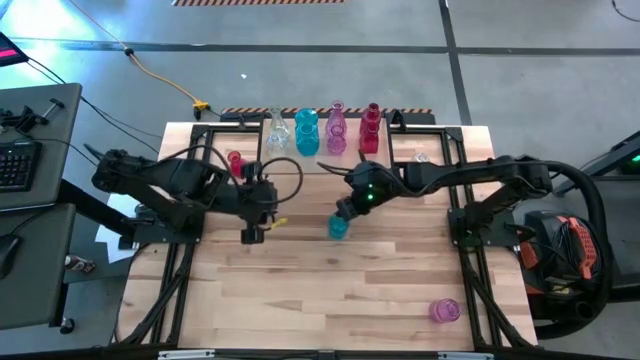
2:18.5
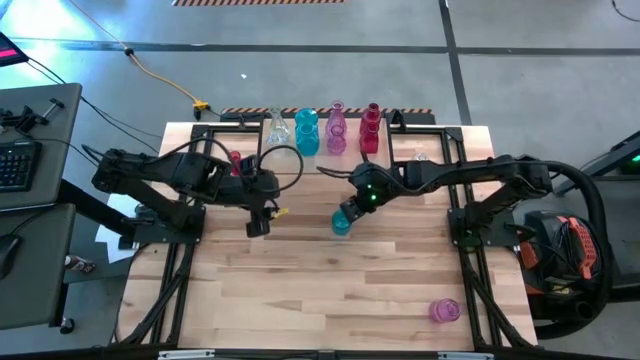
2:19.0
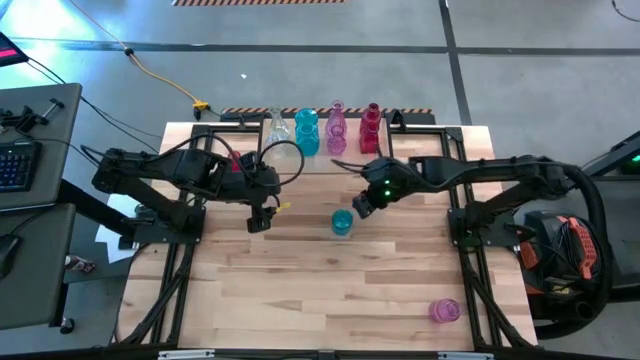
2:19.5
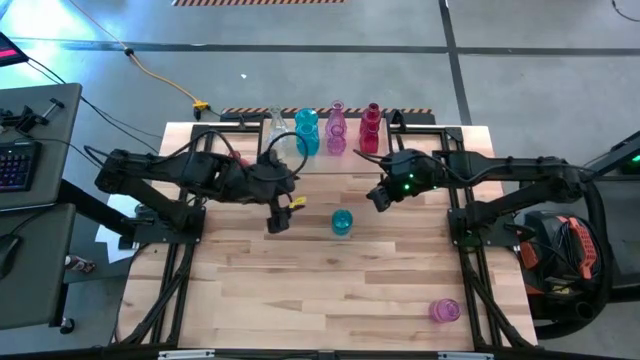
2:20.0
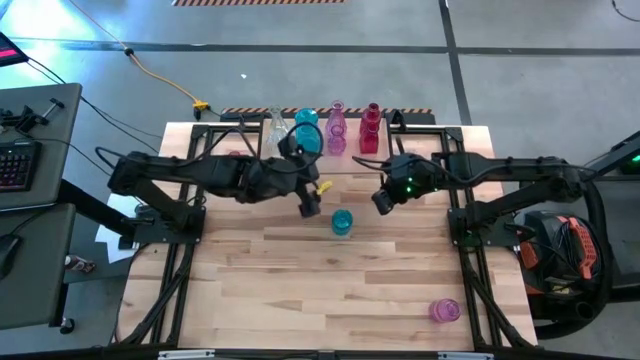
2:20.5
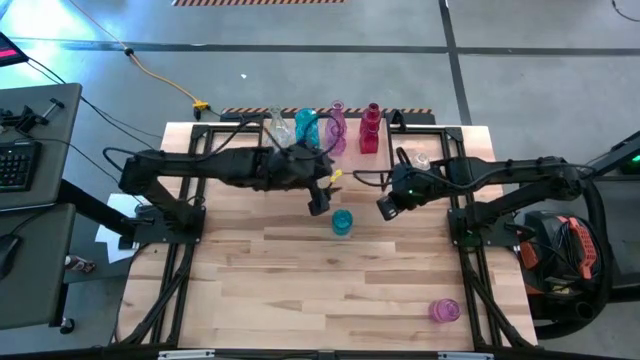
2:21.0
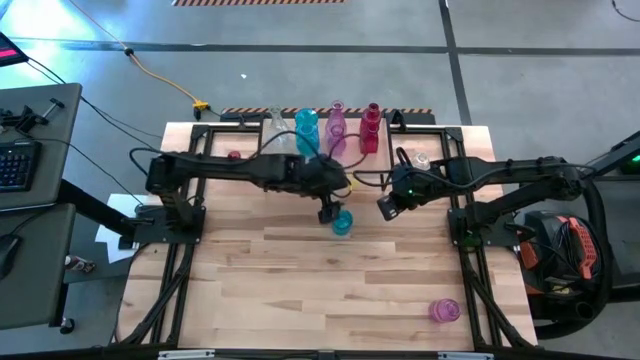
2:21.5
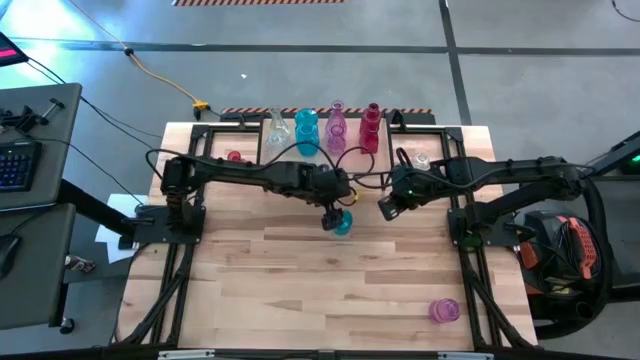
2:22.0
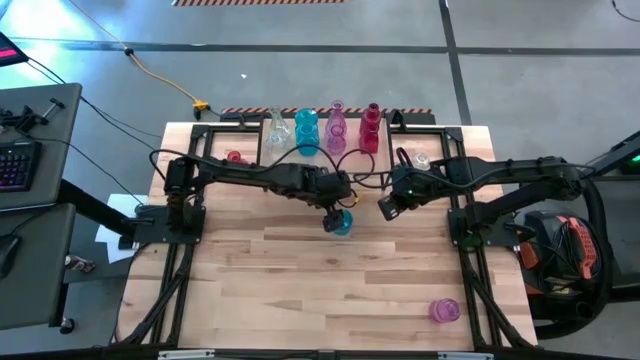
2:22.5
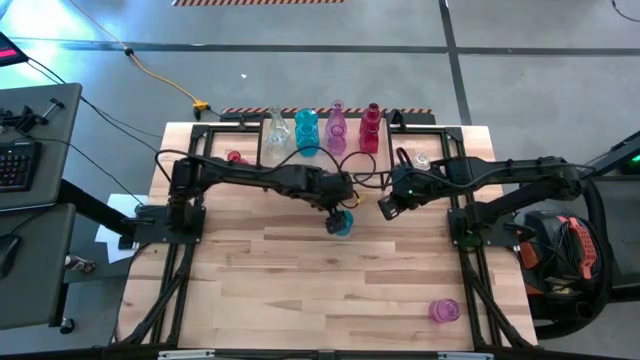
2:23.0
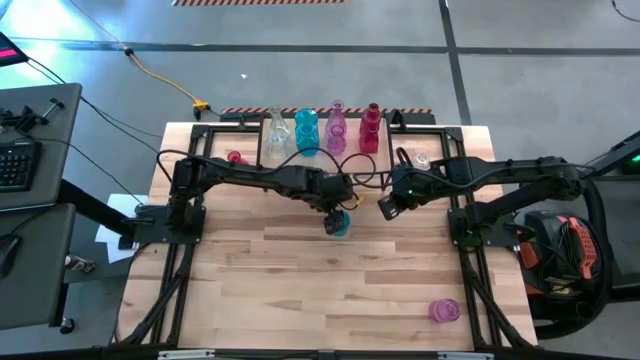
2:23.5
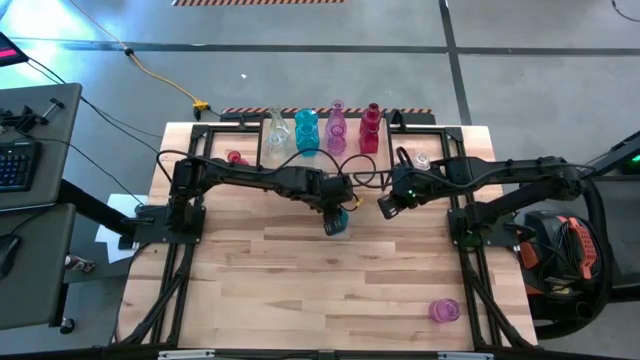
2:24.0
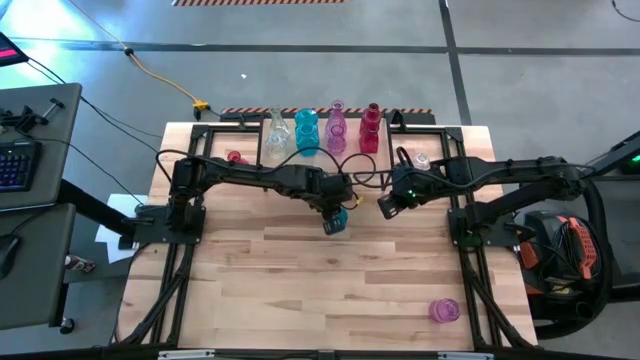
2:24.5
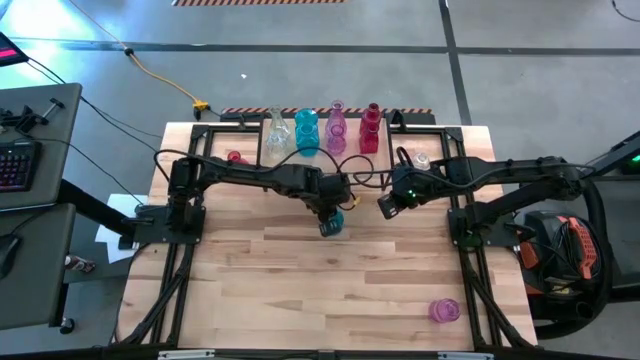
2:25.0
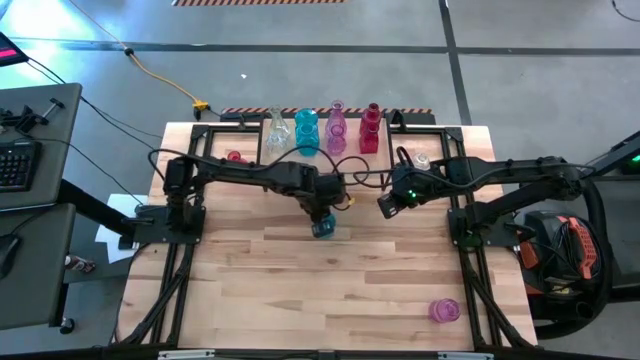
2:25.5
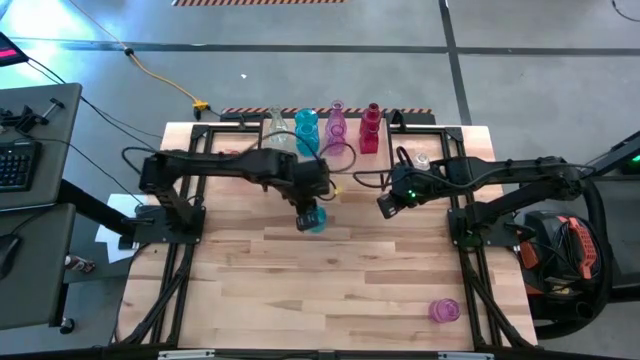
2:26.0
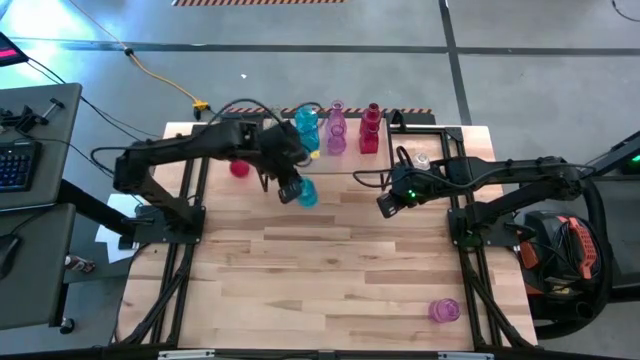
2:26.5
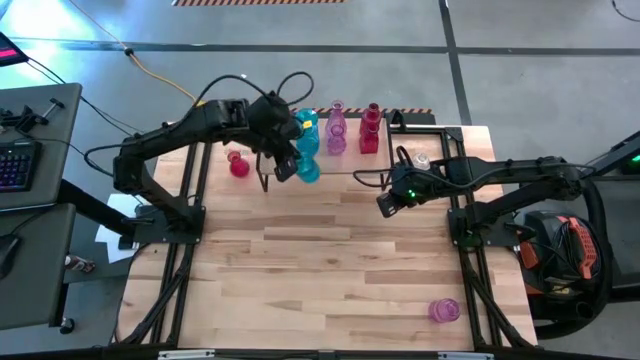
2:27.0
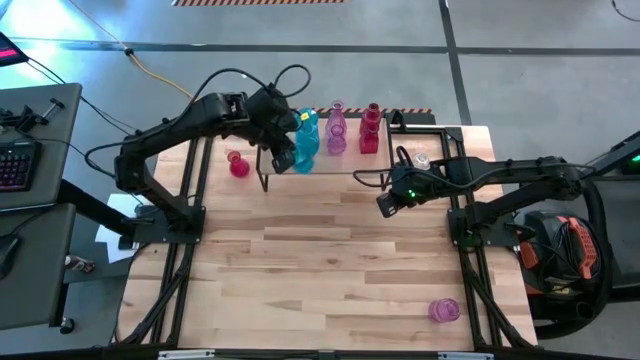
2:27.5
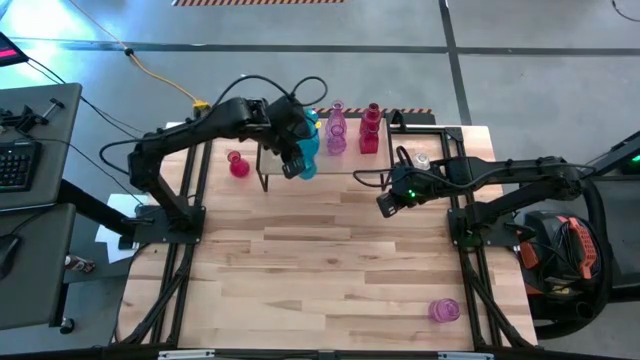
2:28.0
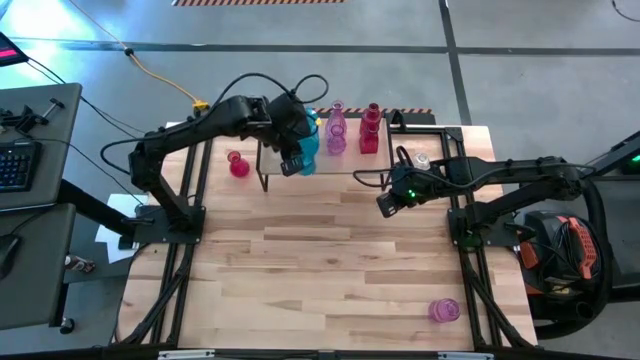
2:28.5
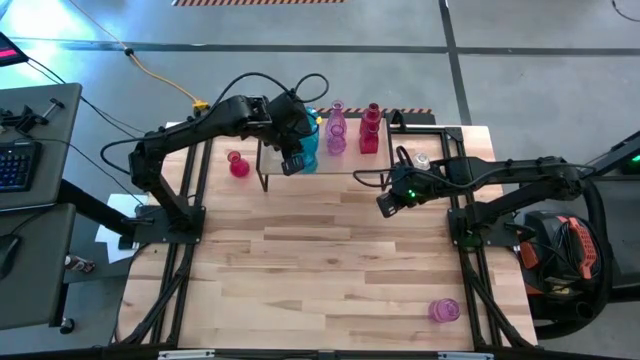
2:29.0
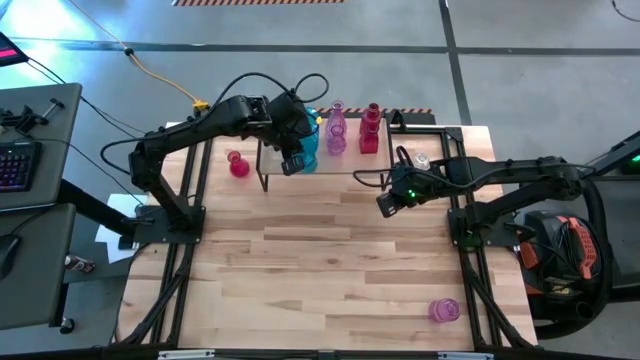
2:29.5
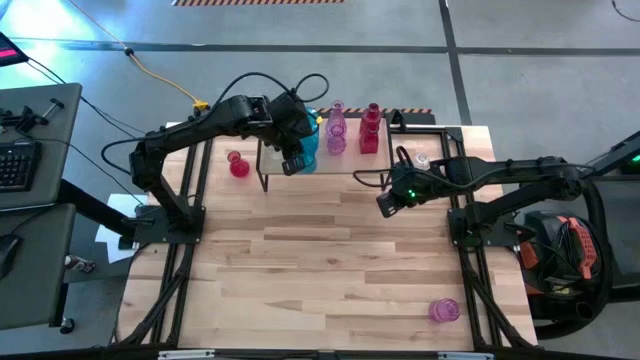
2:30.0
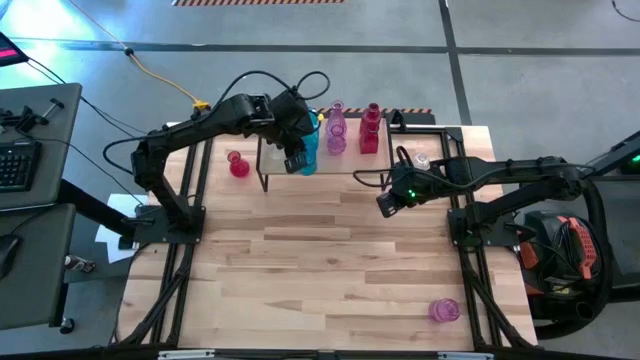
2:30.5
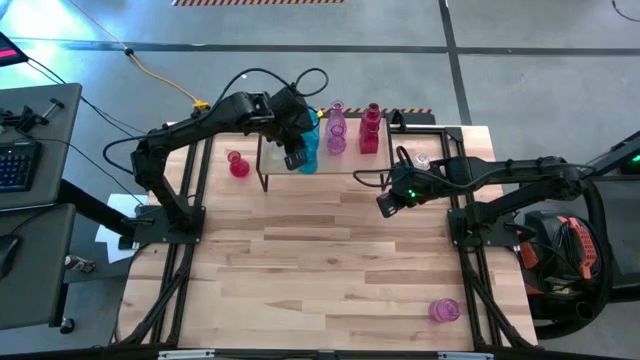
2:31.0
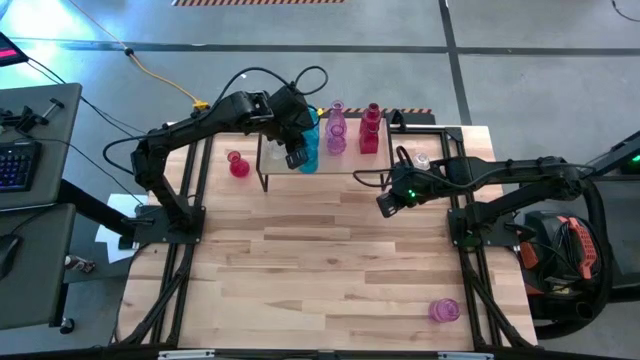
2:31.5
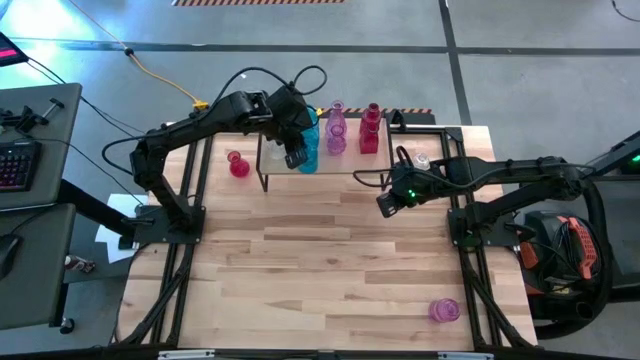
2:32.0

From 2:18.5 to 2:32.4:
Task: sort vases onto shelf
Put the blue flower vase on the shelf aligned with the other blue flower vases

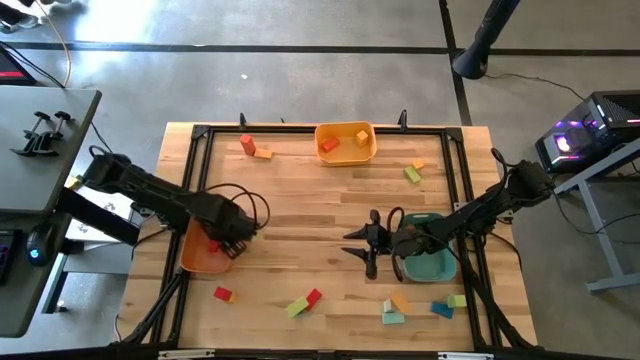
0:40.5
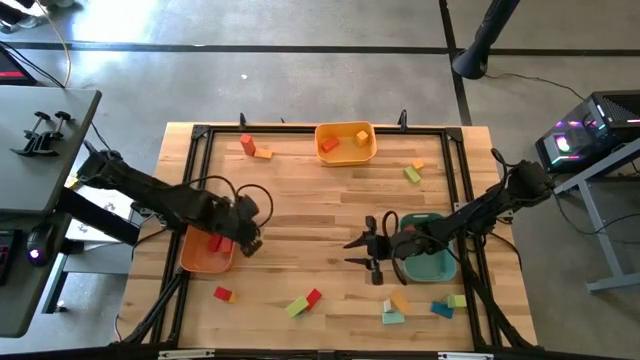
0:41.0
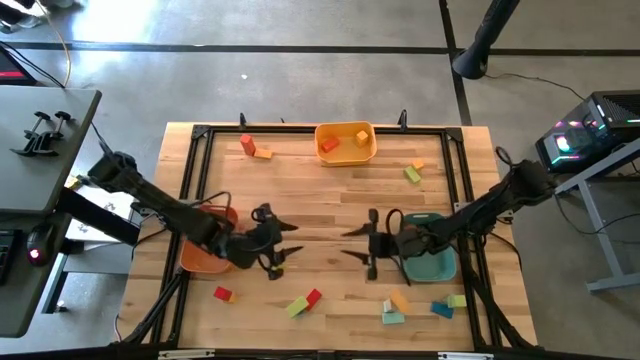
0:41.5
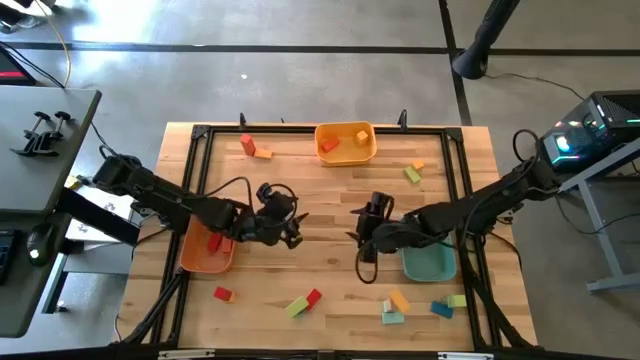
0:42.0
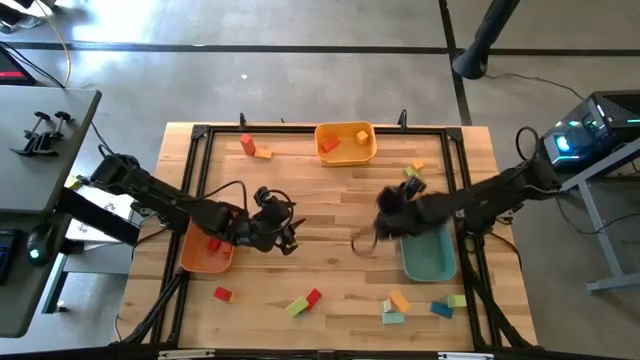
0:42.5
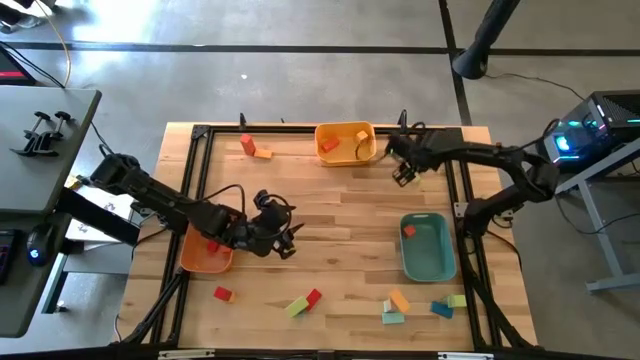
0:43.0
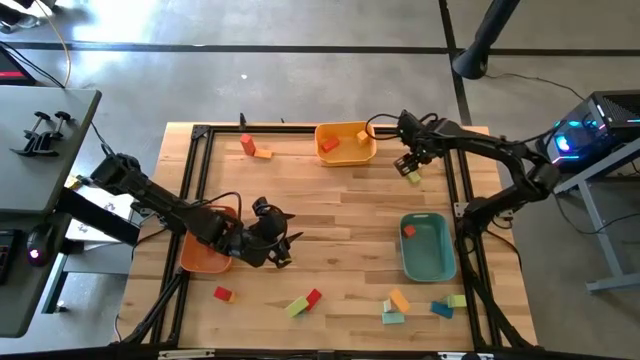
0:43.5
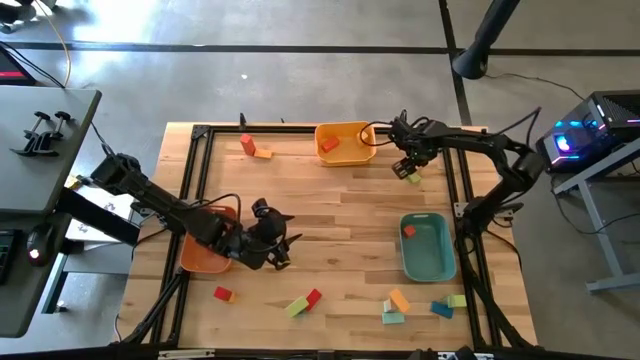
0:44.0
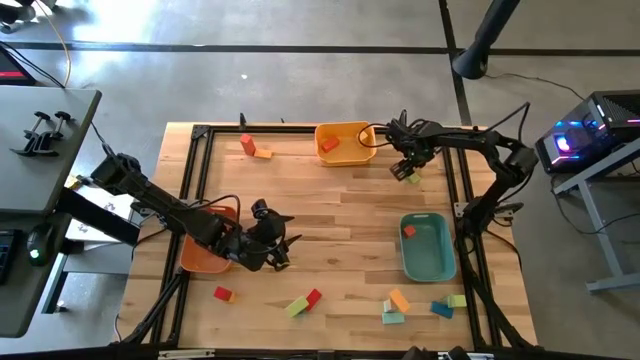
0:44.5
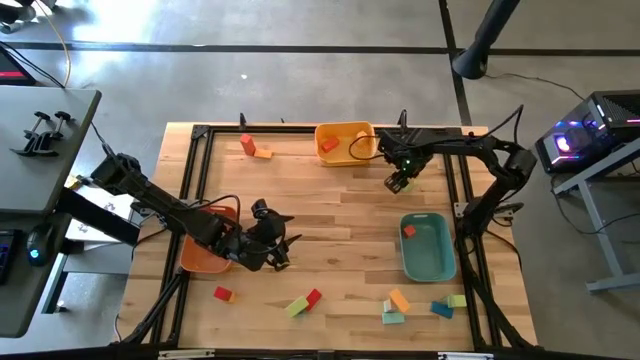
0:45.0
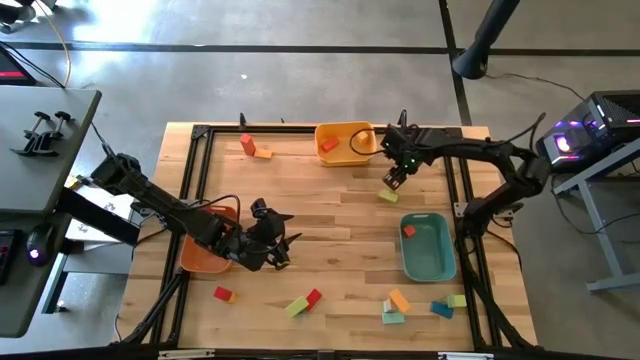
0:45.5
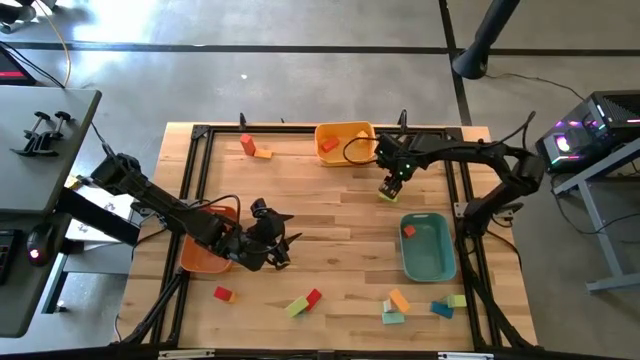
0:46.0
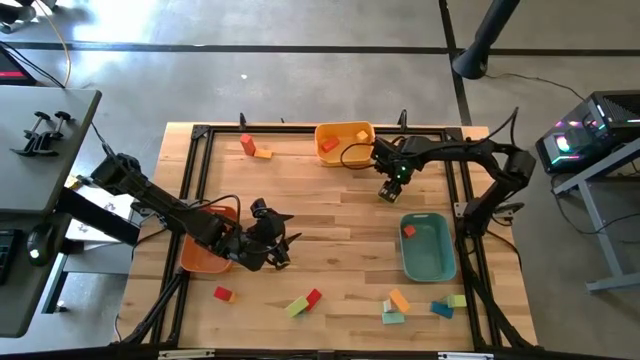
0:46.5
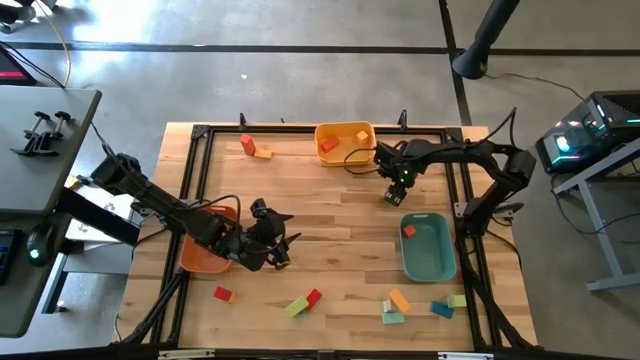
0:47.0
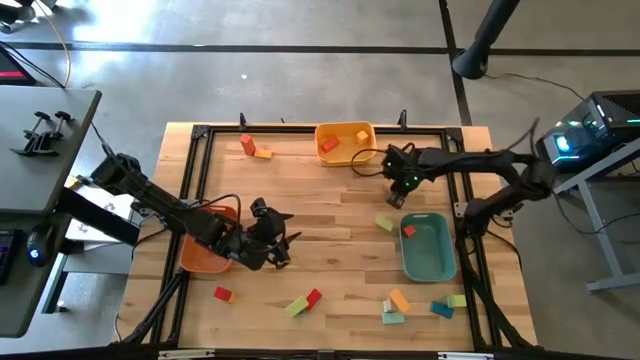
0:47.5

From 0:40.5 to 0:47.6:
Task: Sort blocks by size
Put the yellow small block into the right bin
